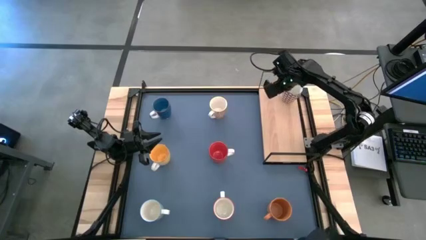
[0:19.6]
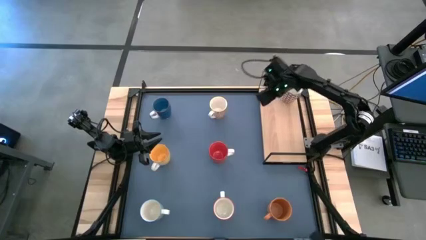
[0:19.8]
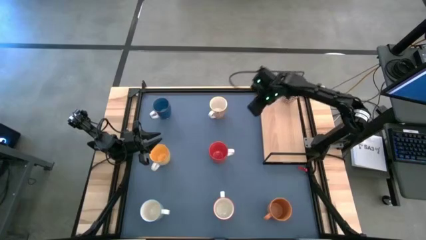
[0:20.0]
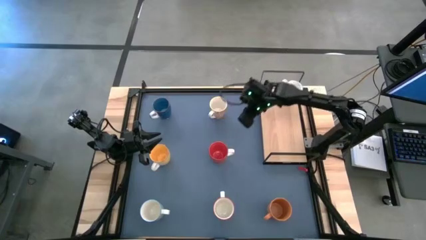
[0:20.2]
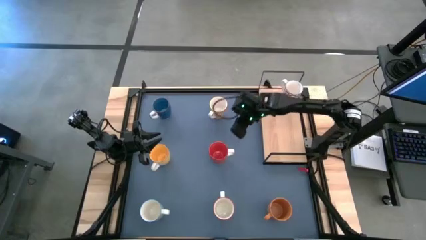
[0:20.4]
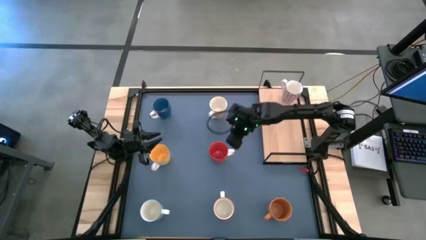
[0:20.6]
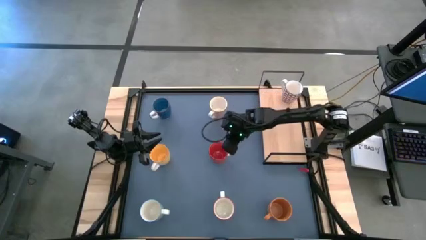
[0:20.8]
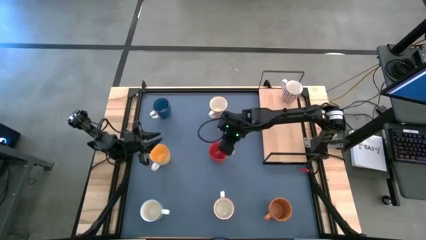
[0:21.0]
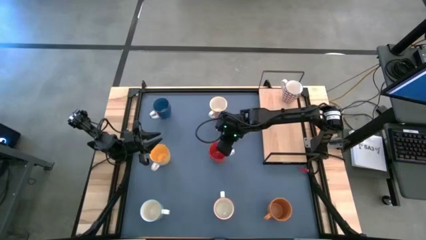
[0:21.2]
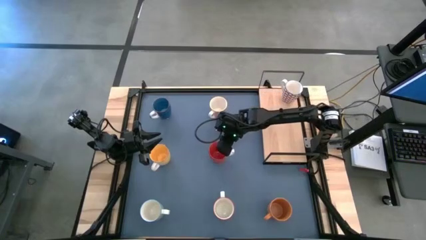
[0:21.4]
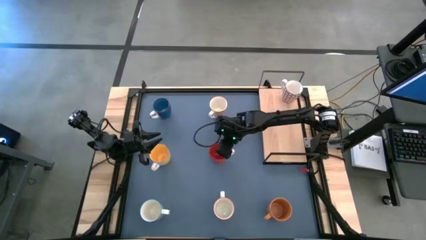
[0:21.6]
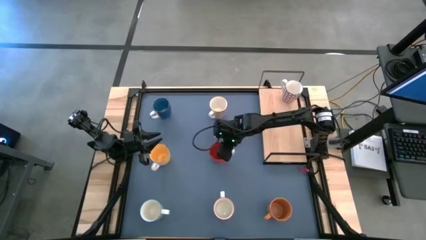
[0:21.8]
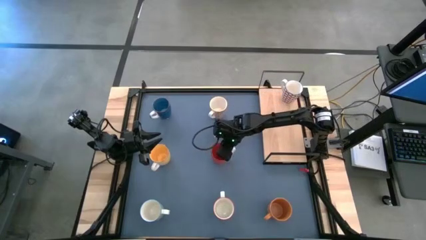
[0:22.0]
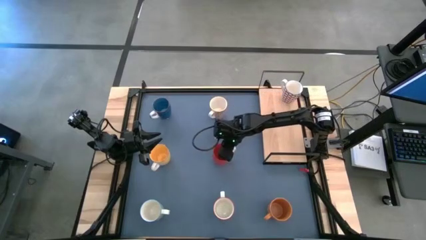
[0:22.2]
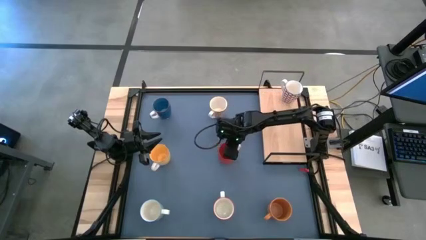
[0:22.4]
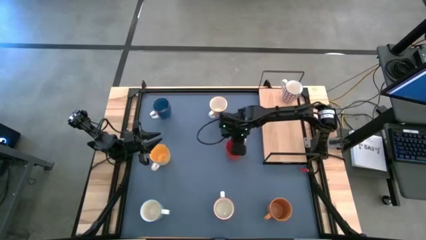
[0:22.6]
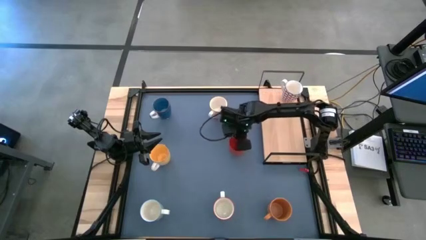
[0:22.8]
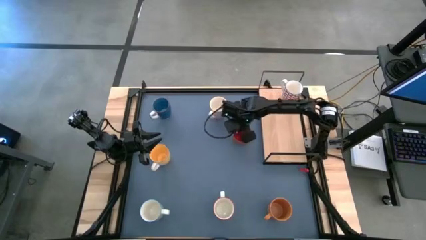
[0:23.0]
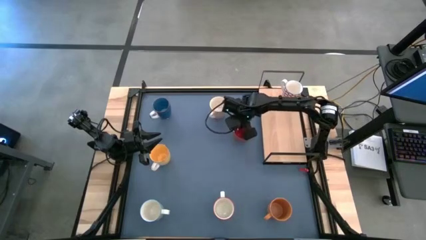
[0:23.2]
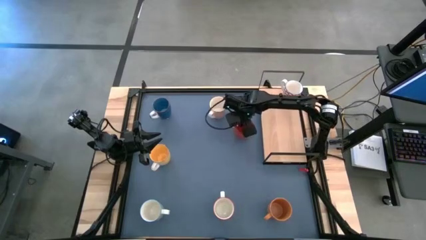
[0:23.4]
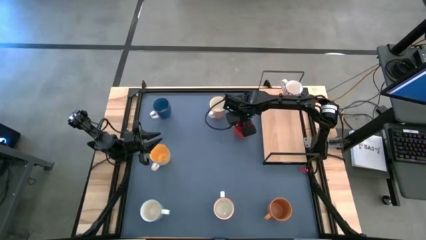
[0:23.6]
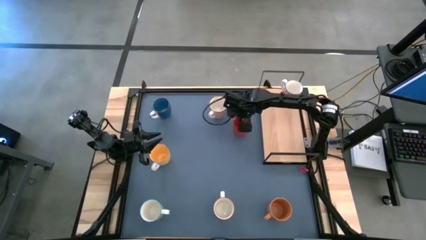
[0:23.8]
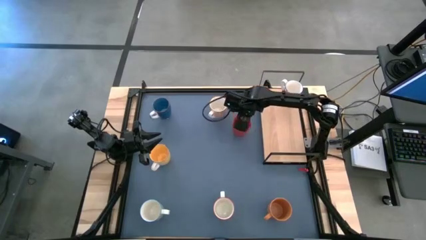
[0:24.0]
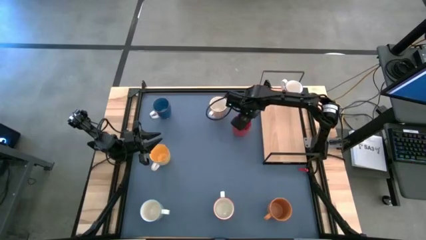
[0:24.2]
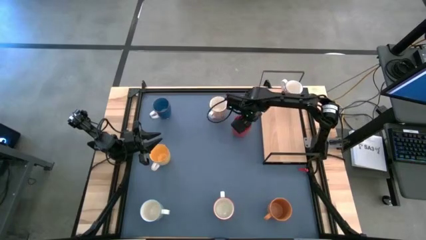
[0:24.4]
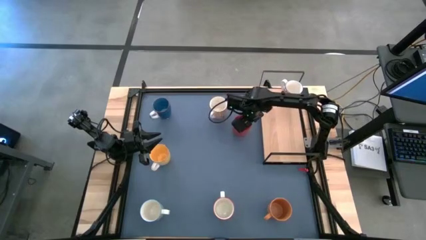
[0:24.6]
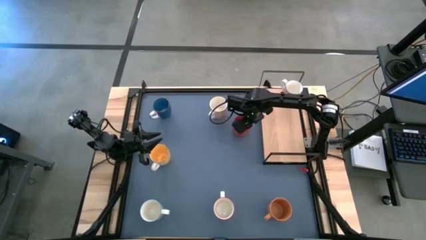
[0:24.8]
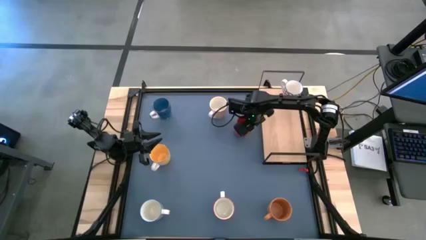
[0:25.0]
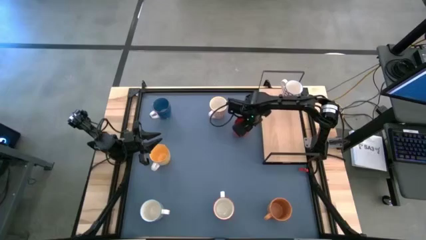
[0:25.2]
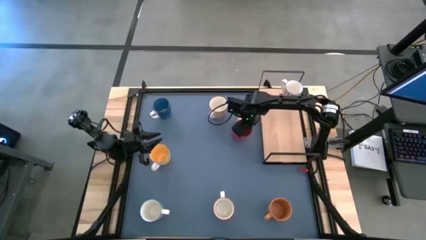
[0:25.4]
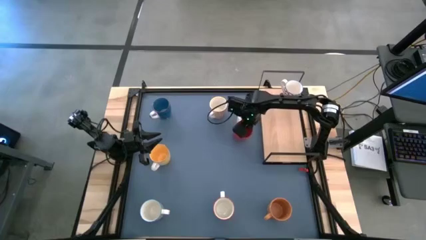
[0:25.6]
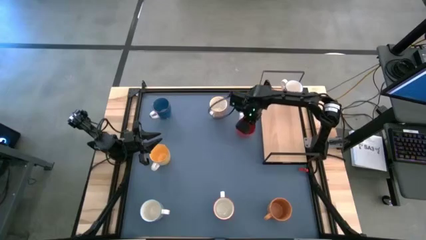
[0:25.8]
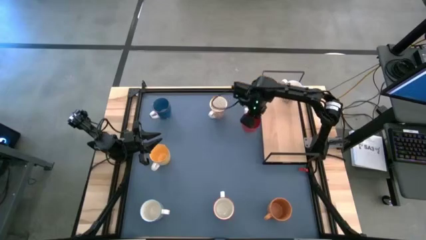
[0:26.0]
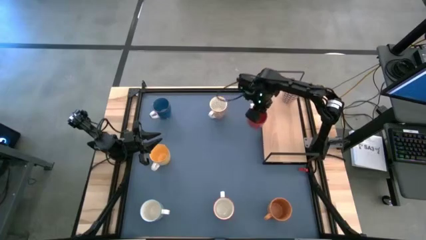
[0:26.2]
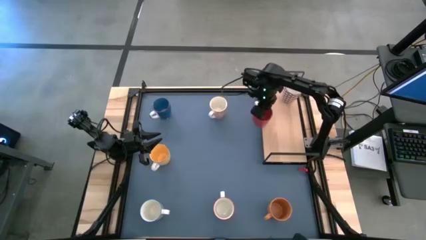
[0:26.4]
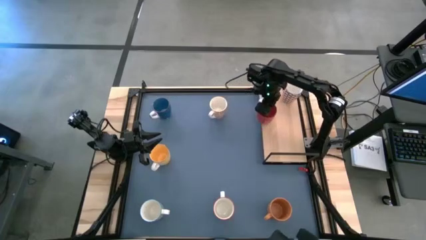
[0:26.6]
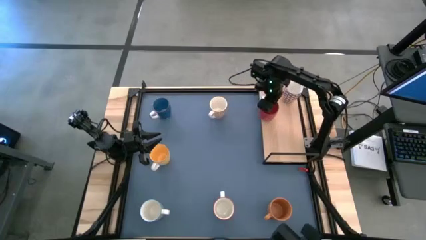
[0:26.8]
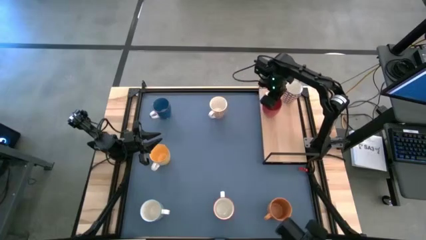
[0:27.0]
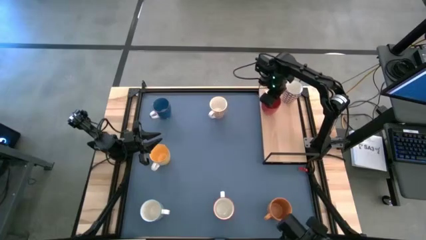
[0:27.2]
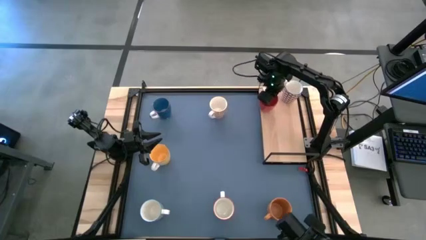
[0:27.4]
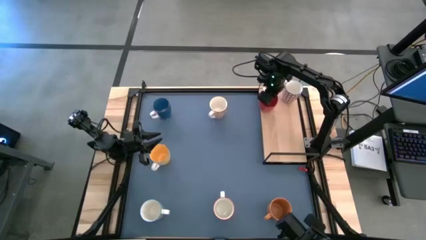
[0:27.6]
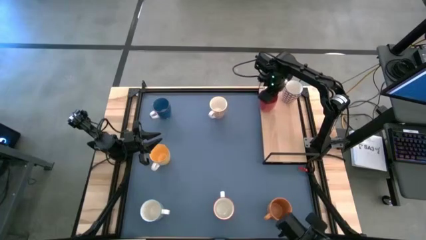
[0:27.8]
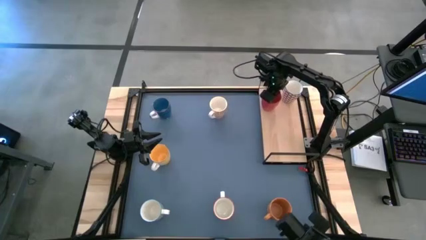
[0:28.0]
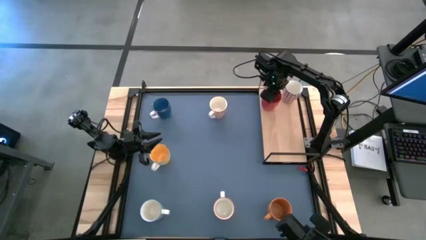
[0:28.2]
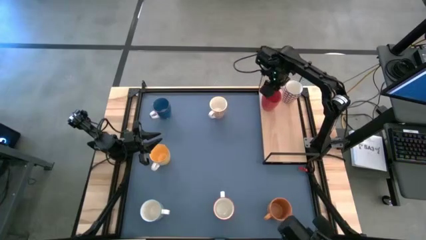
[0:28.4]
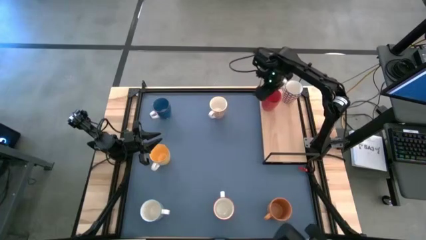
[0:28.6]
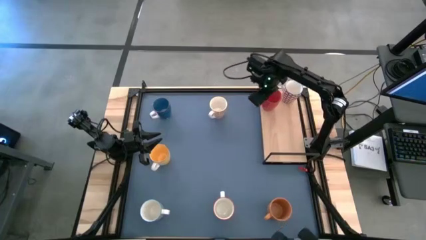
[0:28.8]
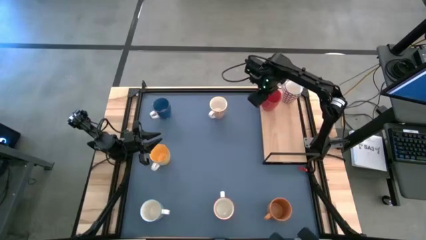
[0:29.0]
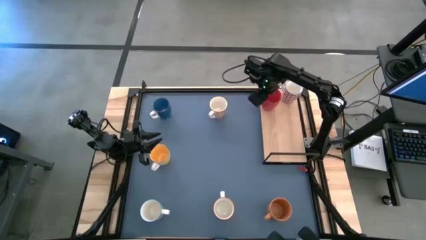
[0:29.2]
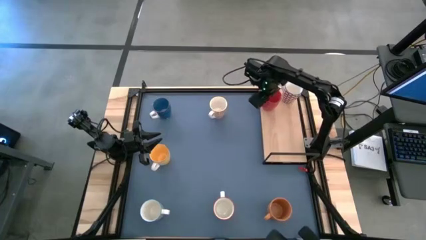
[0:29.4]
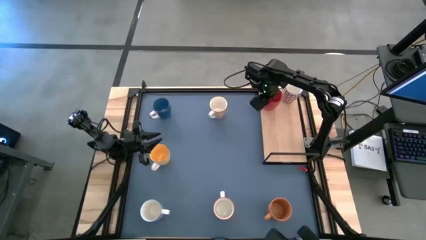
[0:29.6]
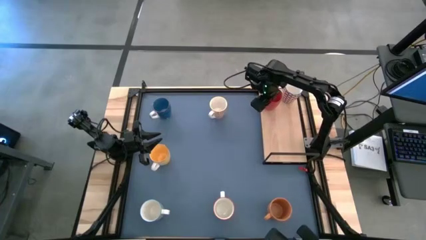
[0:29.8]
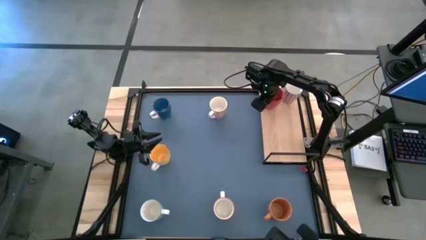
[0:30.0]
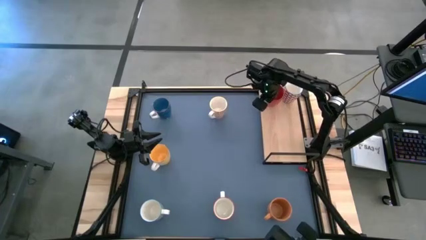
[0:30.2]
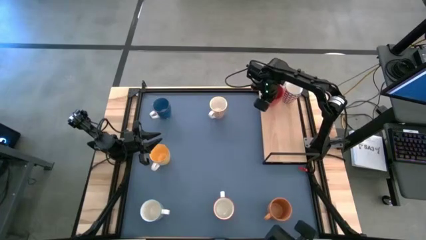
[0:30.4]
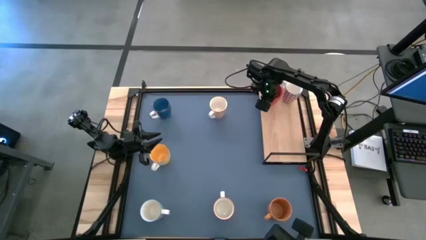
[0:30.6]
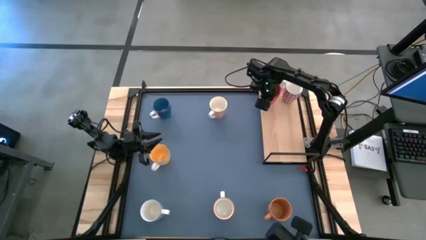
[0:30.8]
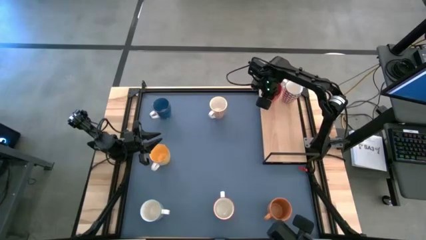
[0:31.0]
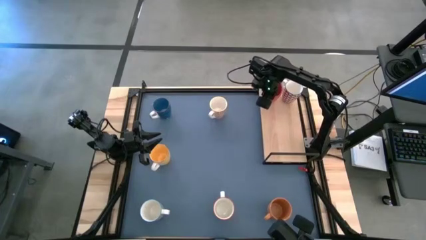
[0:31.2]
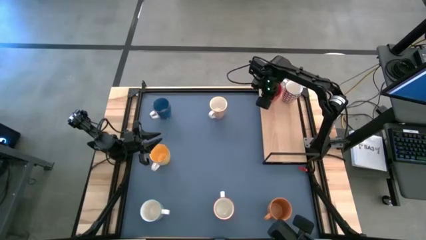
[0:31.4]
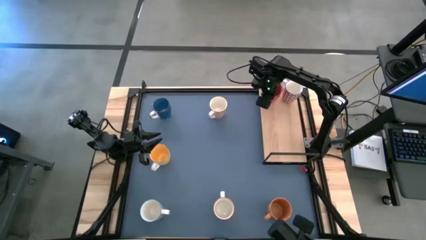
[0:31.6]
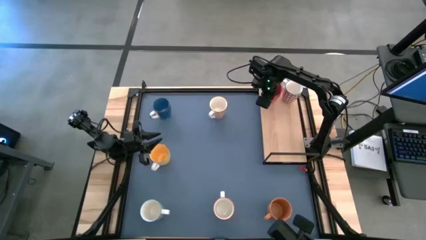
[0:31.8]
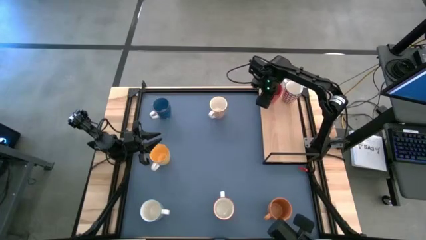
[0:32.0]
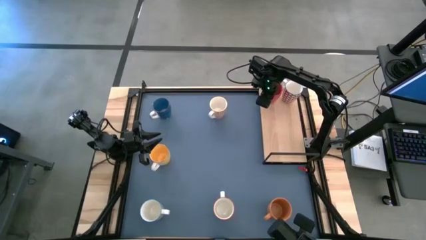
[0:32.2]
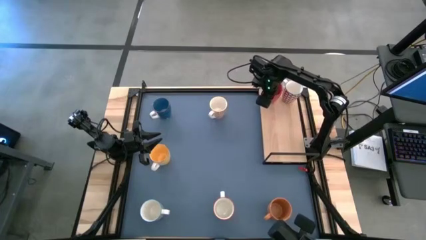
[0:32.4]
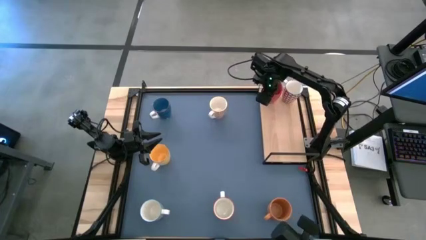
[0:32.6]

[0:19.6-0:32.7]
Task: Place coffee mugs
Put the red mug on the shelf

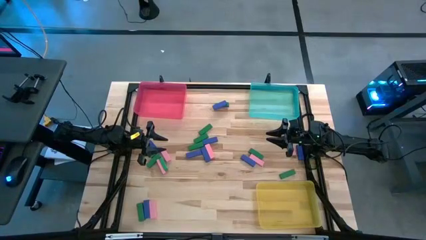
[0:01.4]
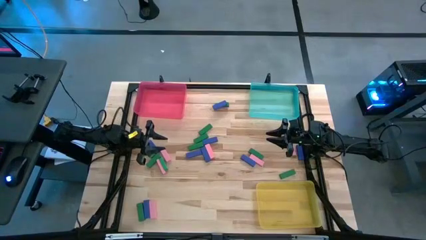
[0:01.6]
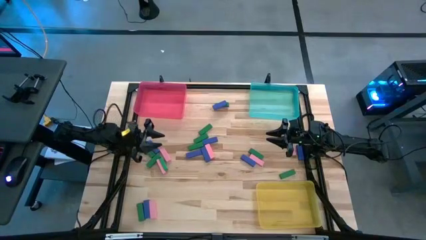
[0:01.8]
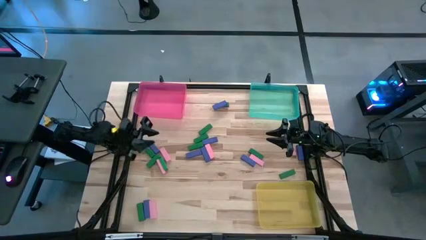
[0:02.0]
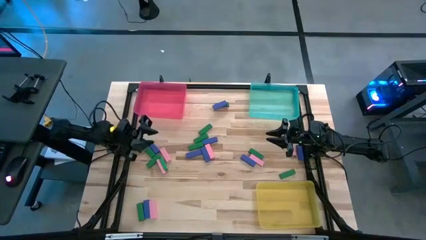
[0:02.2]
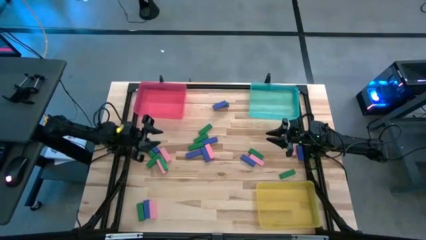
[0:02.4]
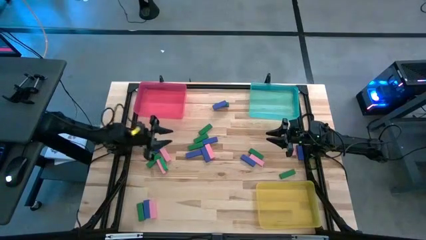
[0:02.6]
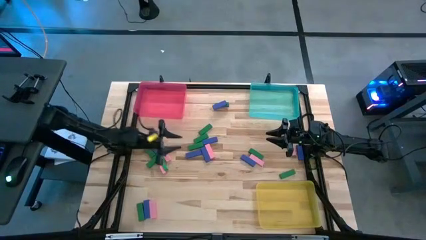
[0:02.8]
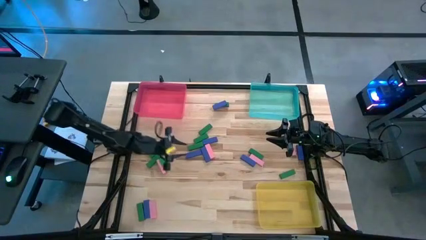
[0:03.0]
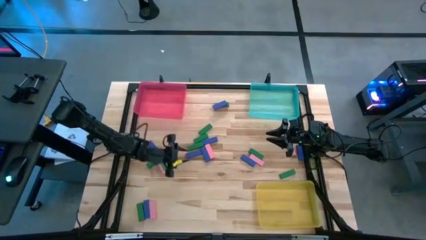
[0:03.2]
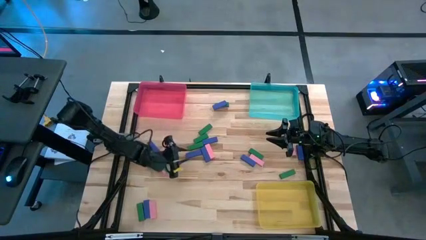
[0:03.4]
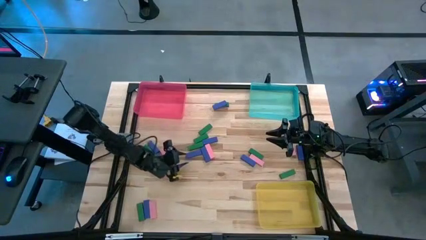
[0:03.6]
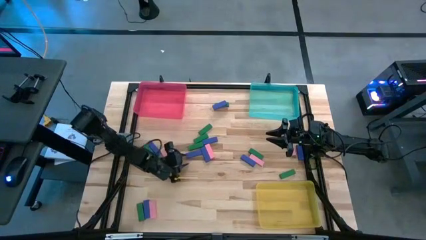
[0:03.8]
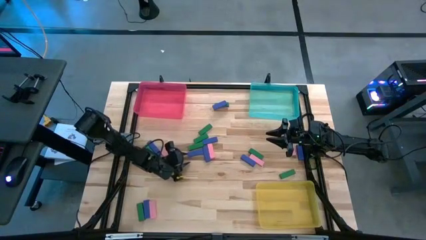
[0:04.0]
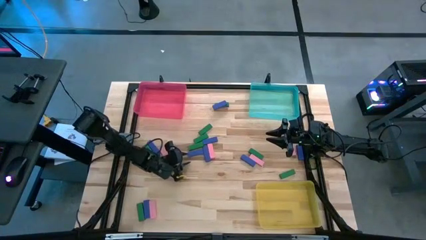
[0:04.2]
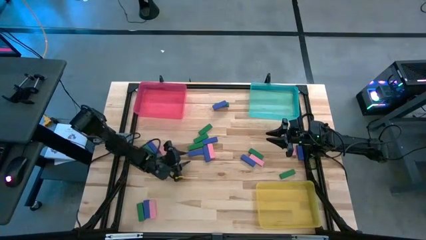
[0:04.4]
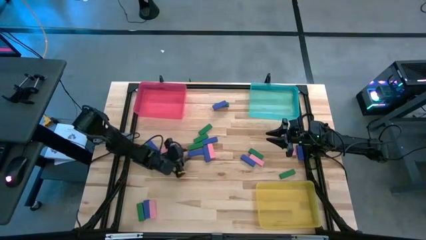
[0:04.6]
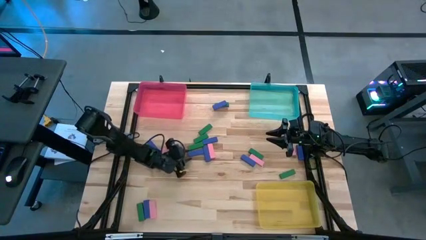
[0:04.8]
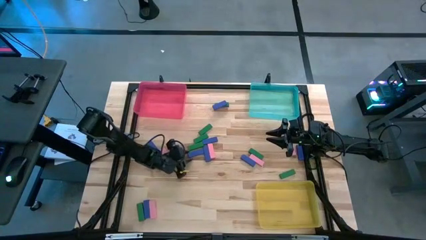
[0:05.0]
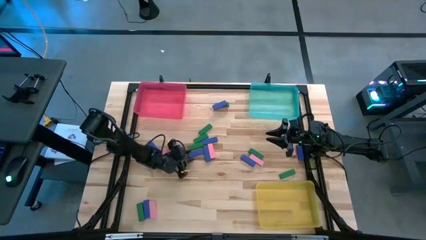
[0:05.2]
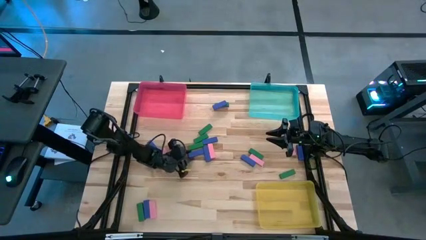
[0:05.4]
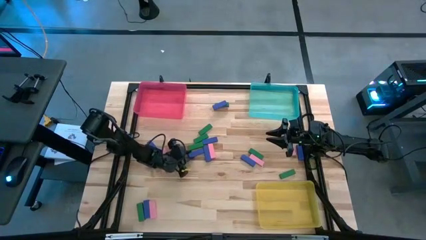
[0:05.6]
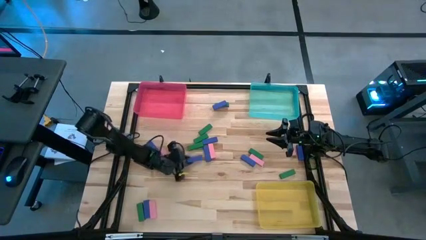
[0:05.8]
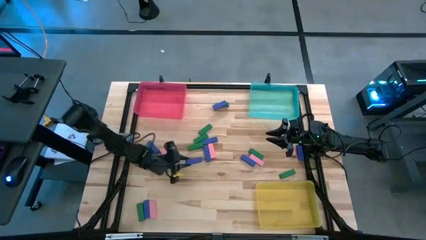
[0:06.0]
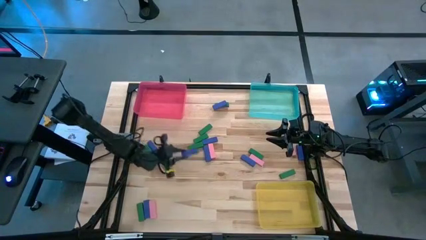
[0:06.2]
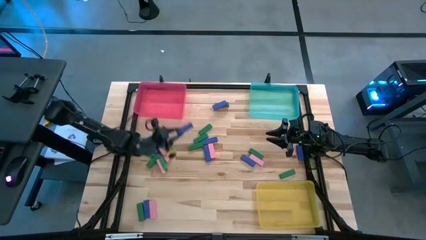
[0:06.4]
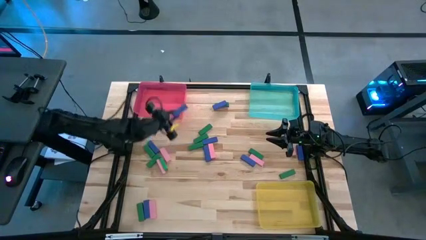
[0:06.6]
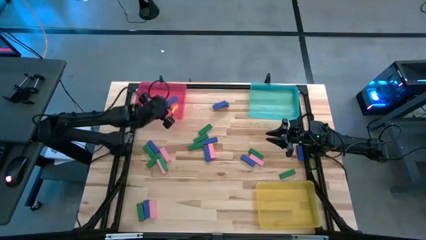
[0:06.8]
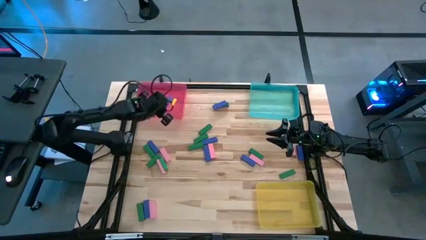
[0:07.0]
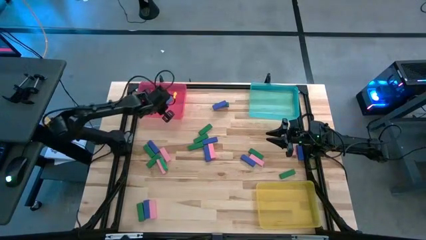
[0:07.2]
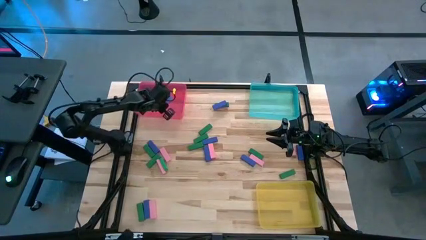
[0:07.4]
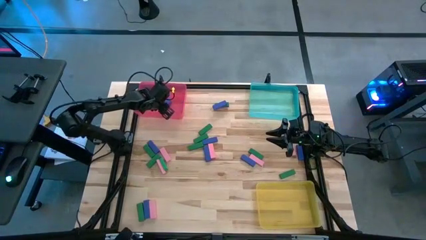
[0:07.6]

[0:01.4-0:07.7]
Task: Sort blocks
Put the blue block into the red bin
